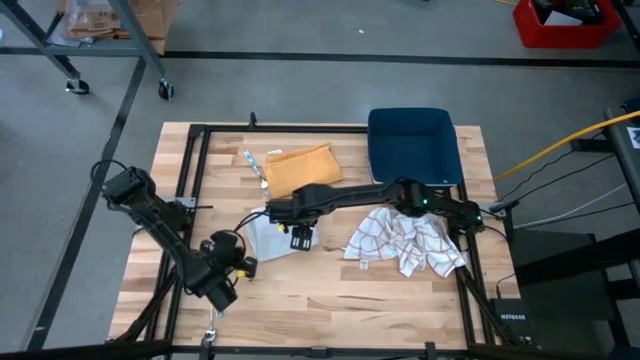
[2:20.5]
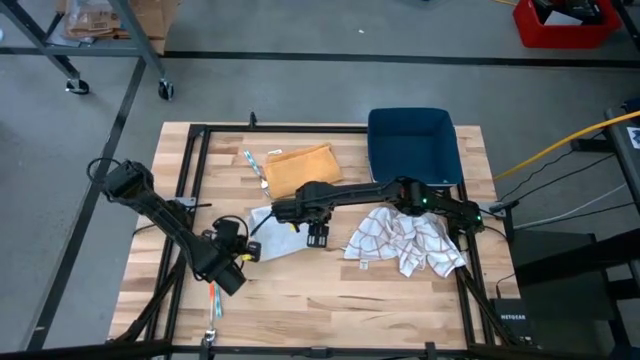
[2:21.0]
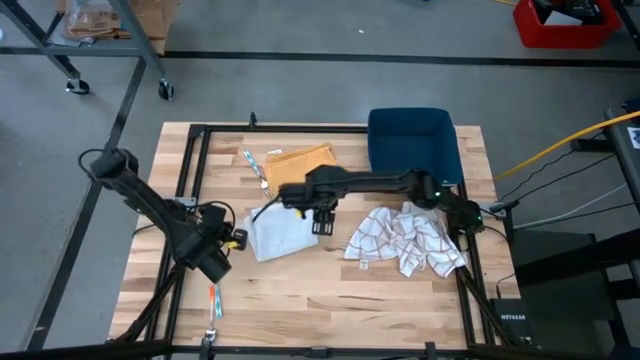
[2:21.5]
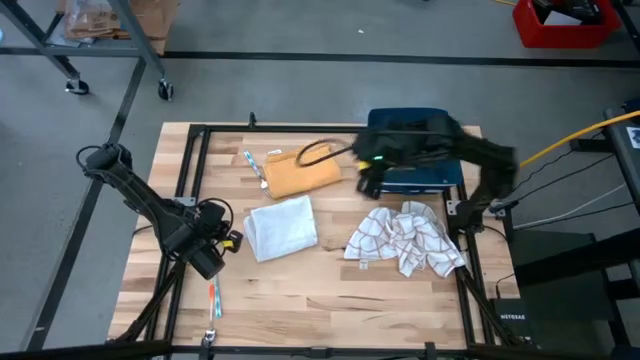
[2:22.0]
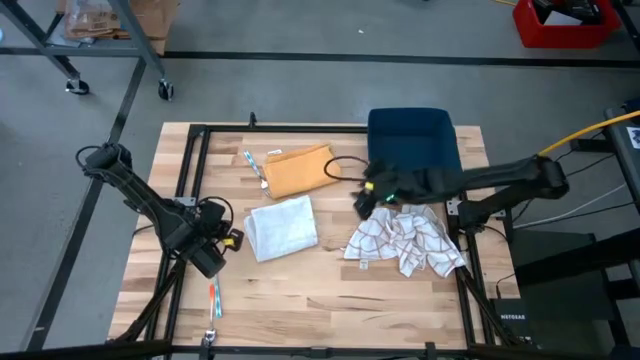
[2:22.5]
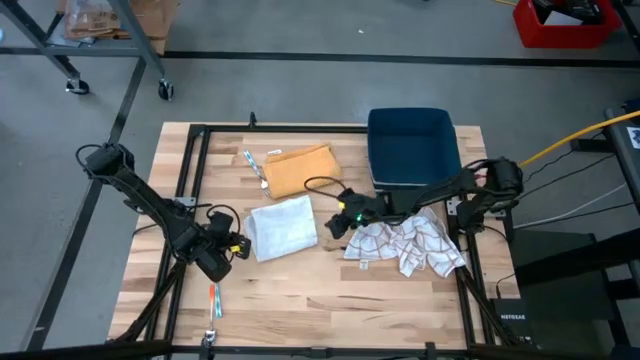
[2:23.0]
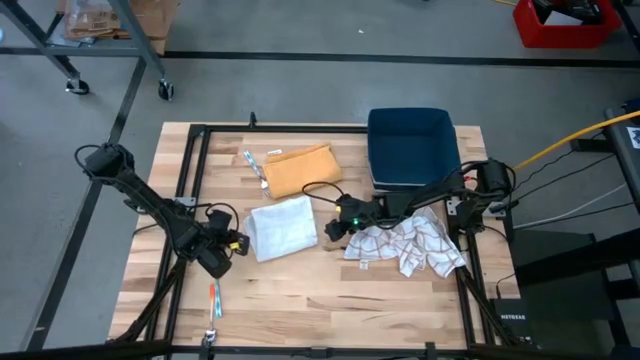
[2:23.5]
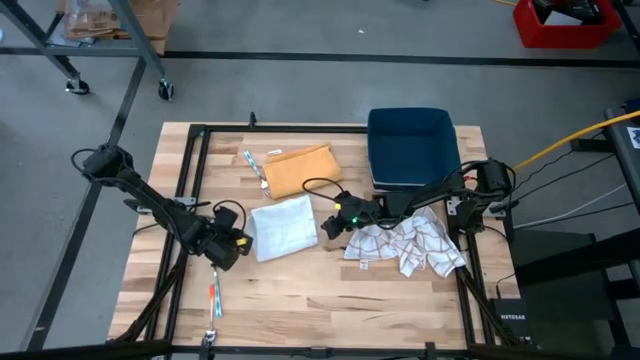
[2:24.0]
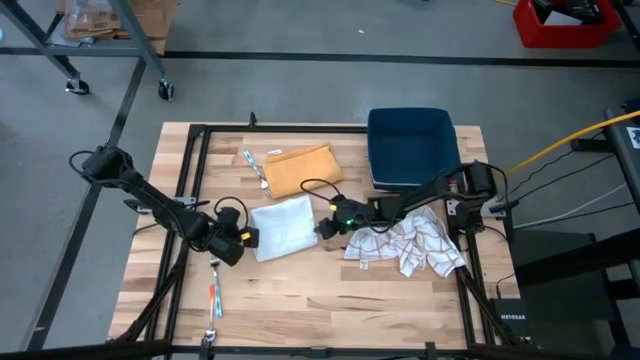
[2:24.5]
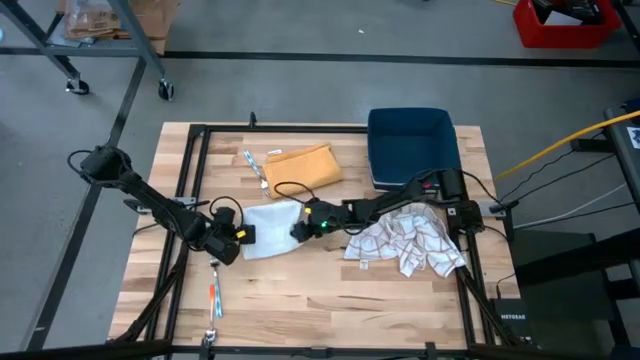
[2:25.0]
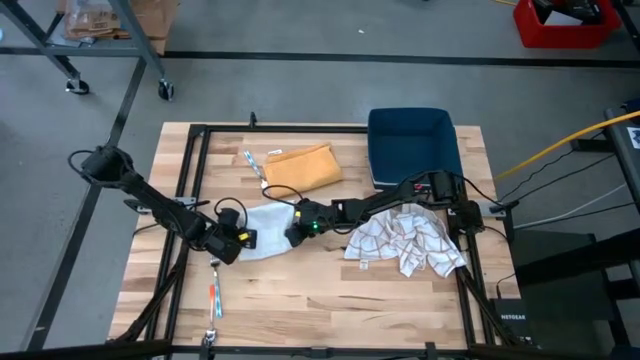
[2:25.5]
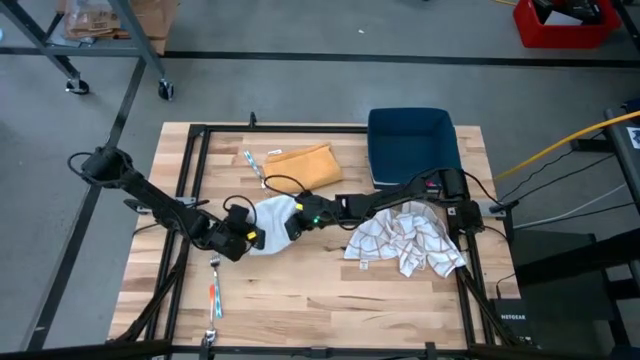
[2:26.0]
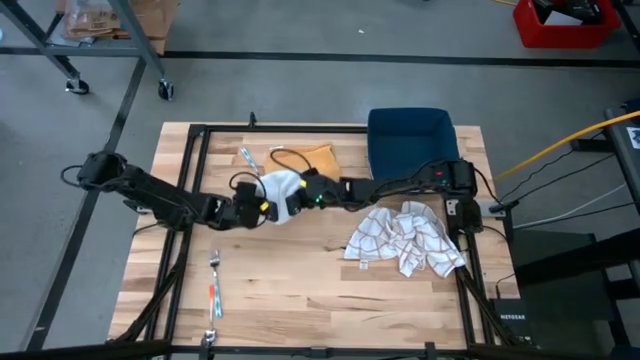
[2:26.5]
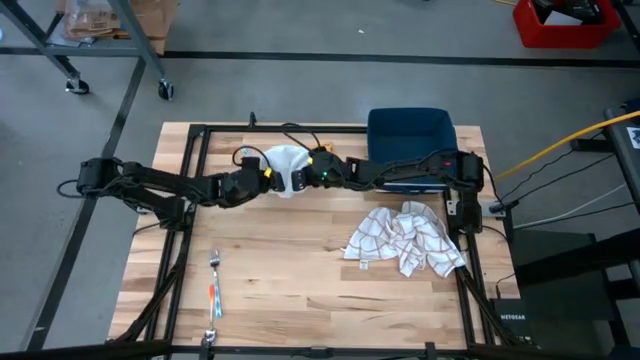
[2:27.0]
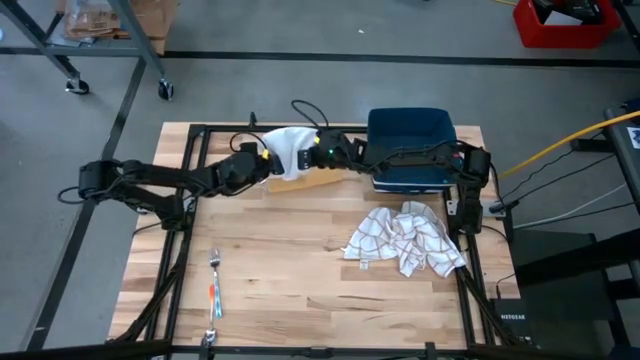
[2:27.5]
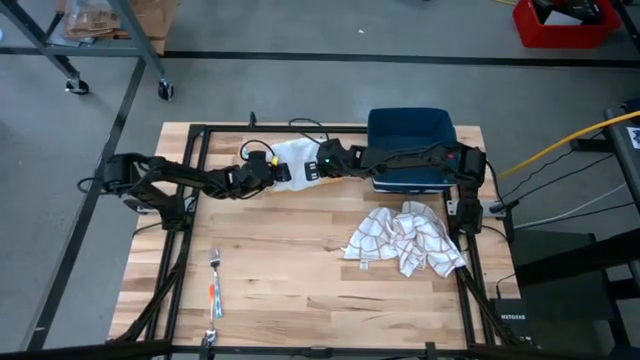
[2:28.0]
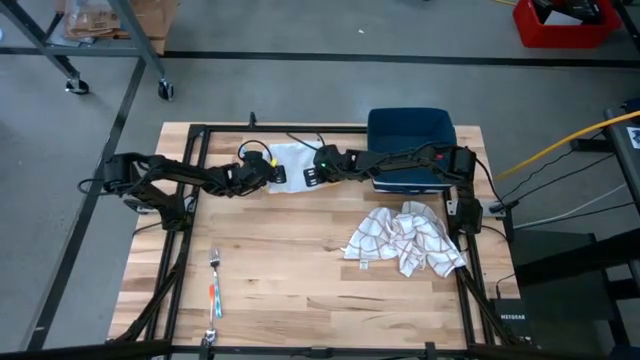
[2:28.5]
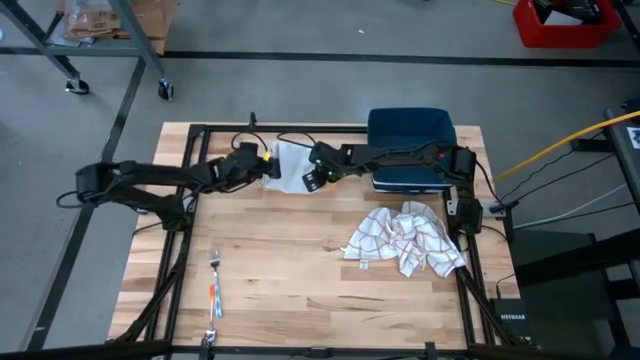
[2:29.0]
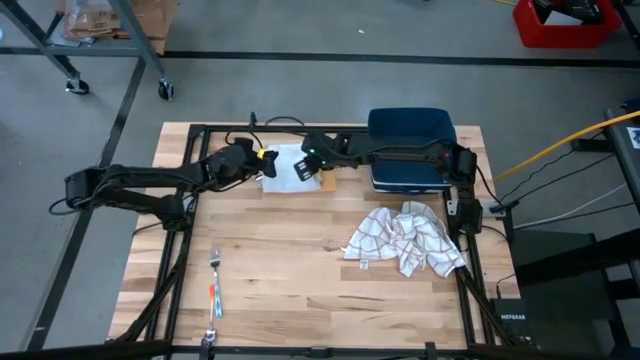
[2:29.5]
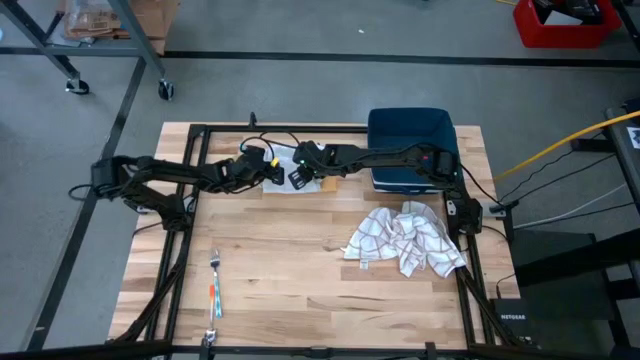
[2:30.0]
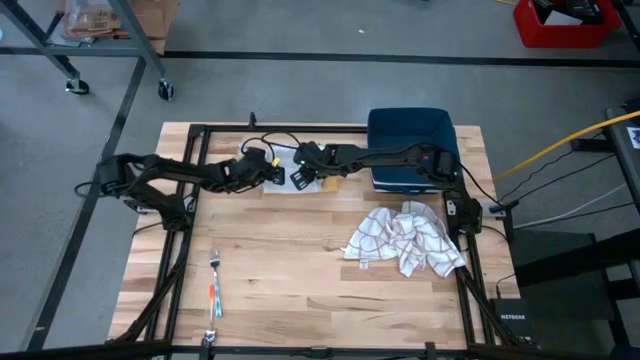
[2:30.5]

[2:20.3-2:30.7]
Task: Fold towel
Stack the left folded white towel on top of the yellow towel

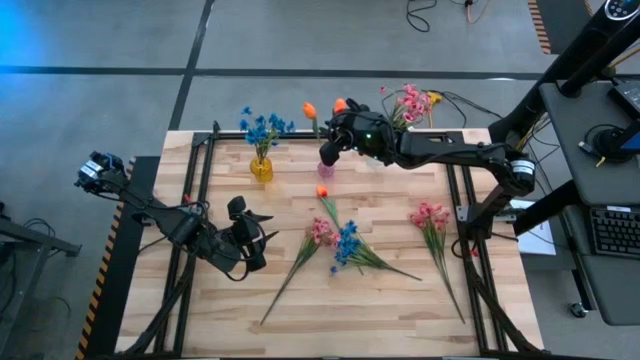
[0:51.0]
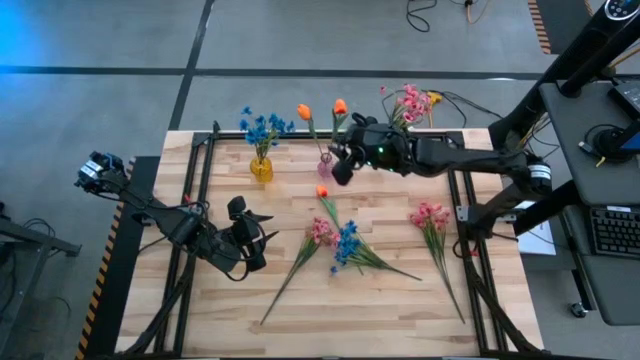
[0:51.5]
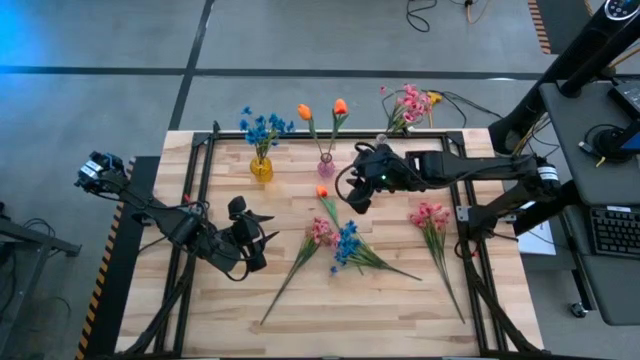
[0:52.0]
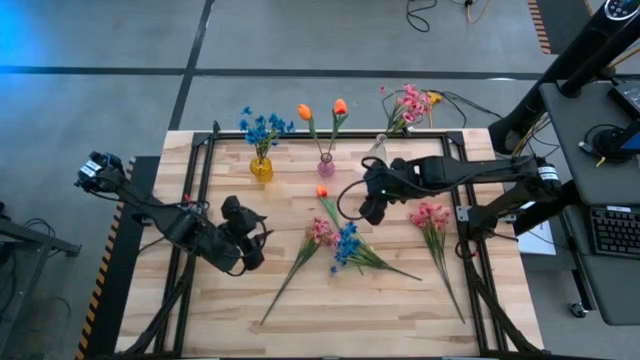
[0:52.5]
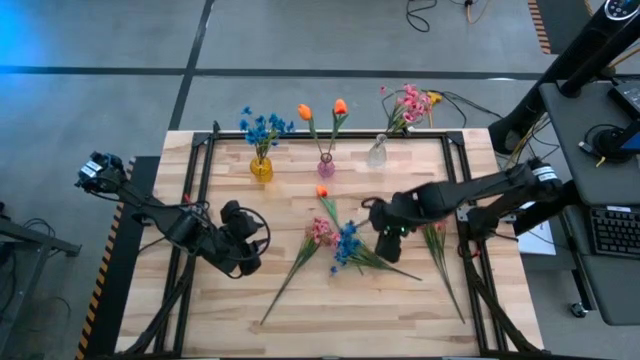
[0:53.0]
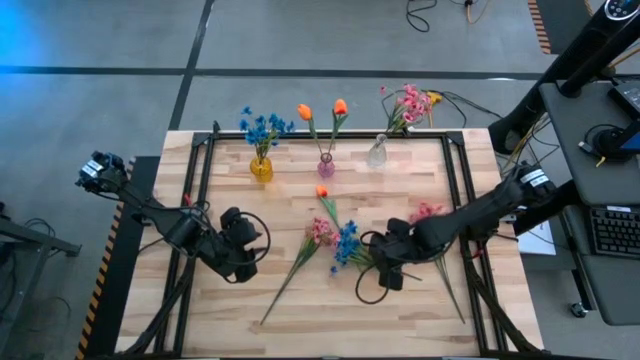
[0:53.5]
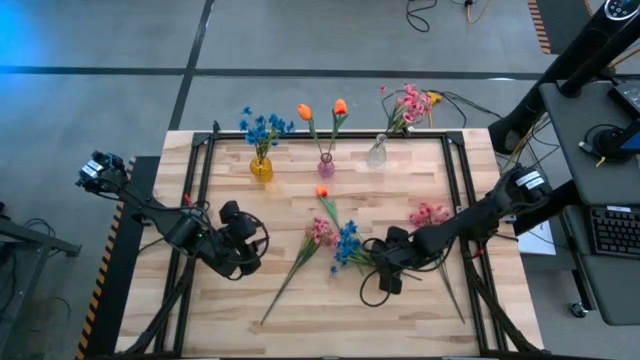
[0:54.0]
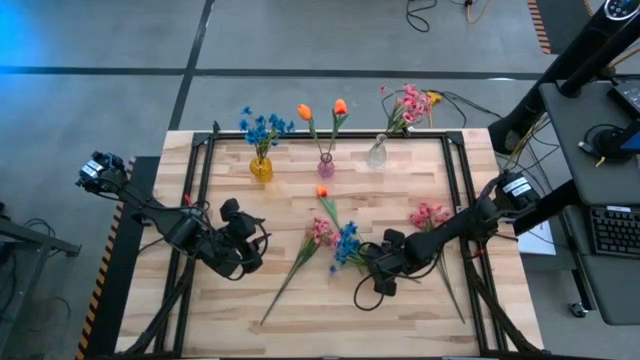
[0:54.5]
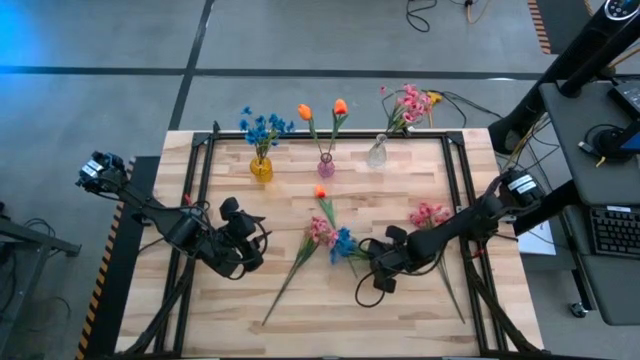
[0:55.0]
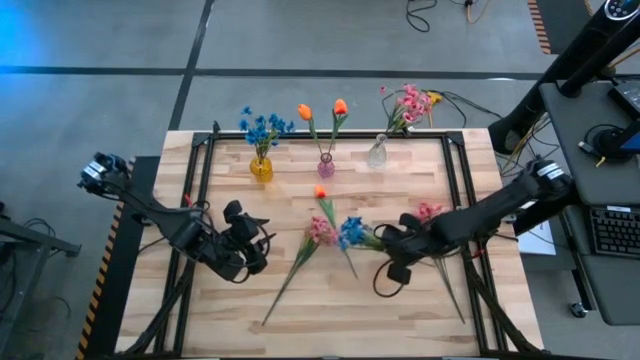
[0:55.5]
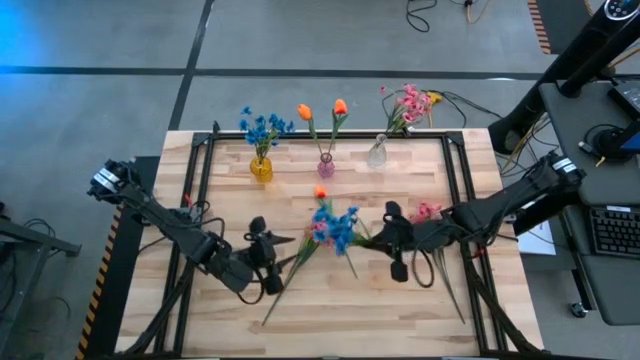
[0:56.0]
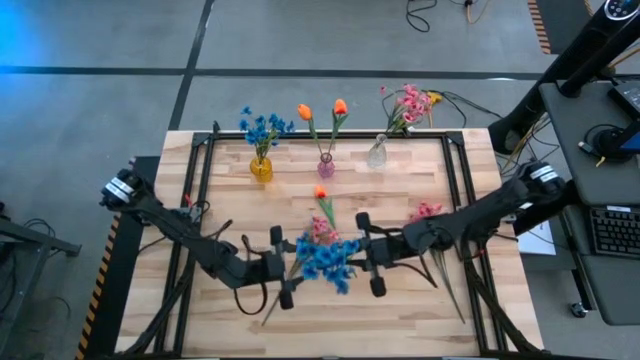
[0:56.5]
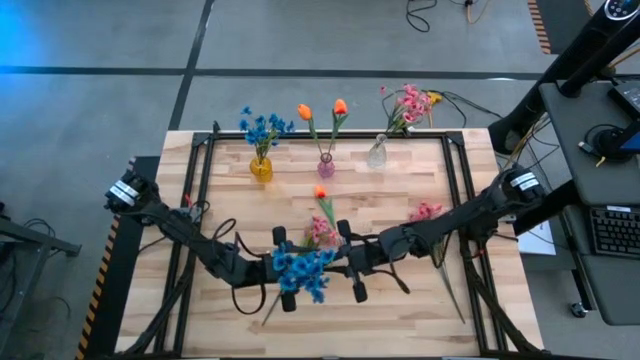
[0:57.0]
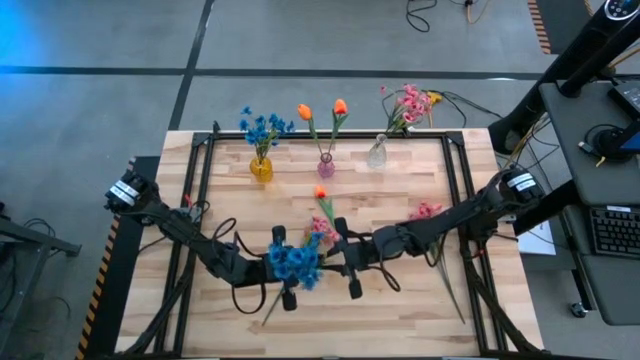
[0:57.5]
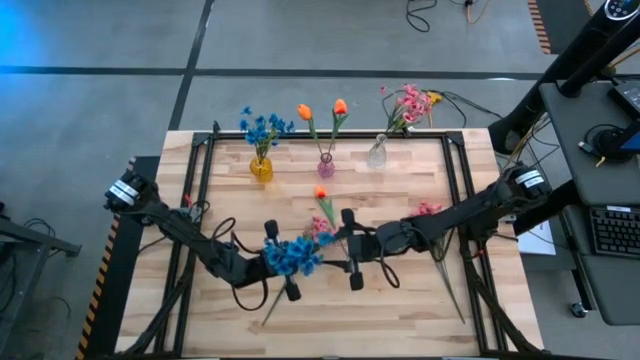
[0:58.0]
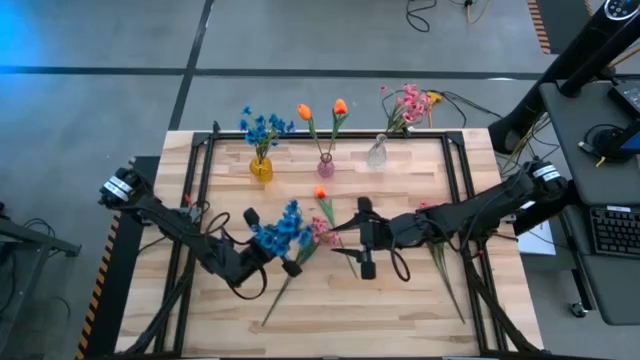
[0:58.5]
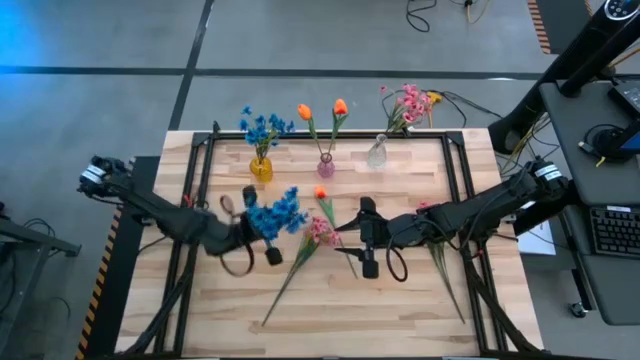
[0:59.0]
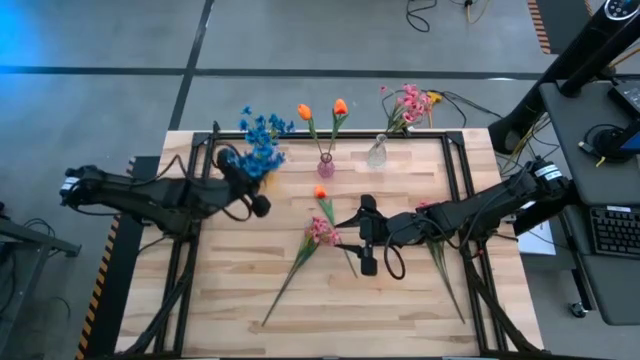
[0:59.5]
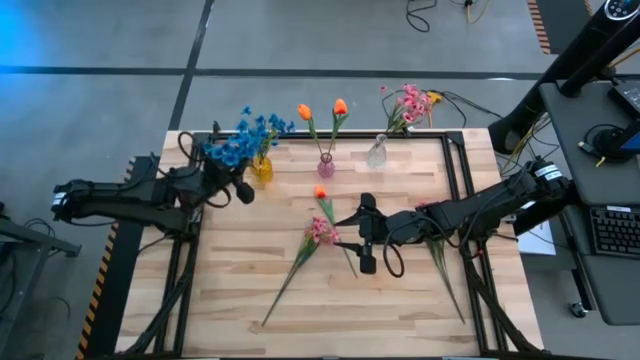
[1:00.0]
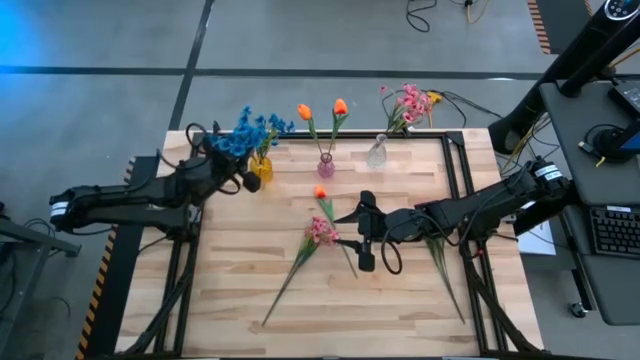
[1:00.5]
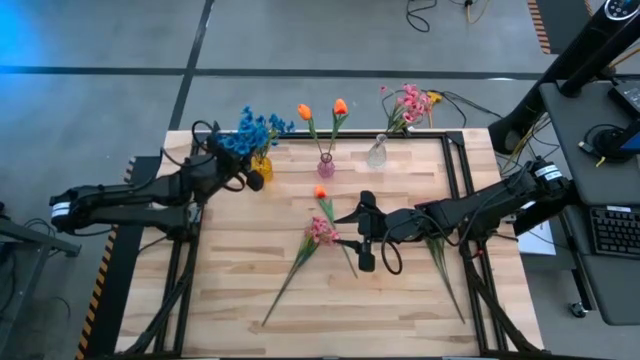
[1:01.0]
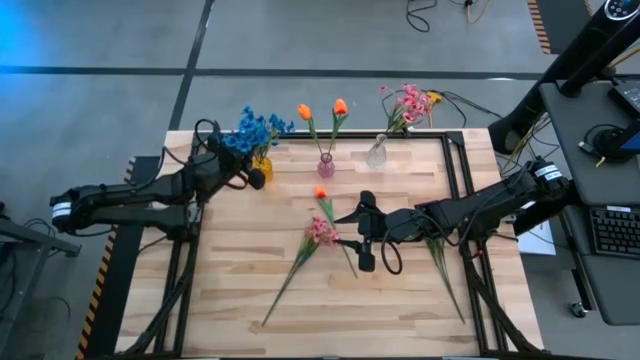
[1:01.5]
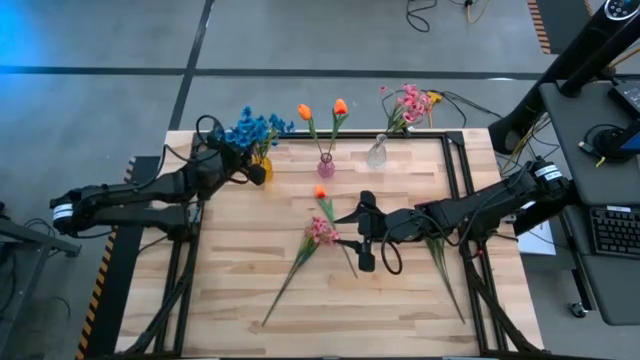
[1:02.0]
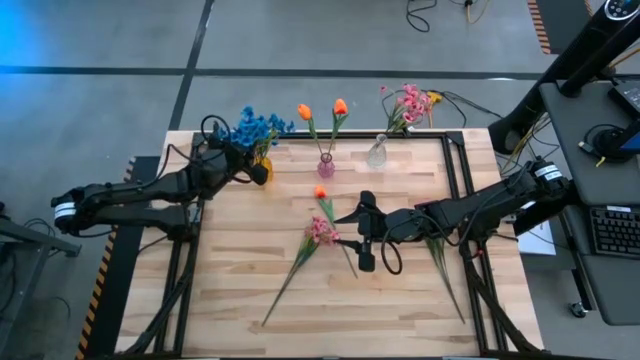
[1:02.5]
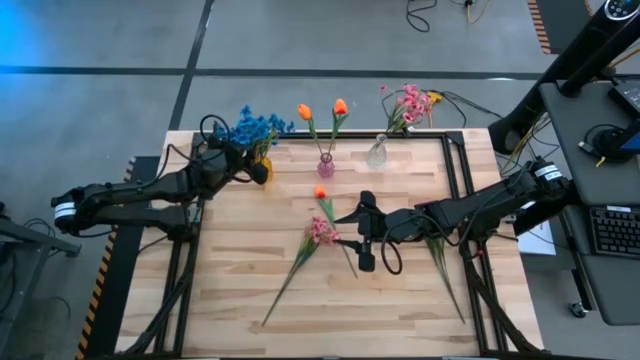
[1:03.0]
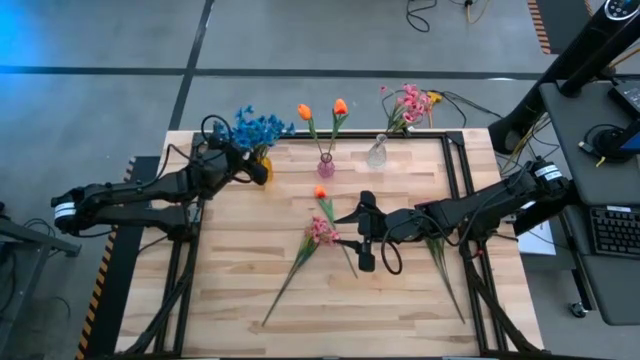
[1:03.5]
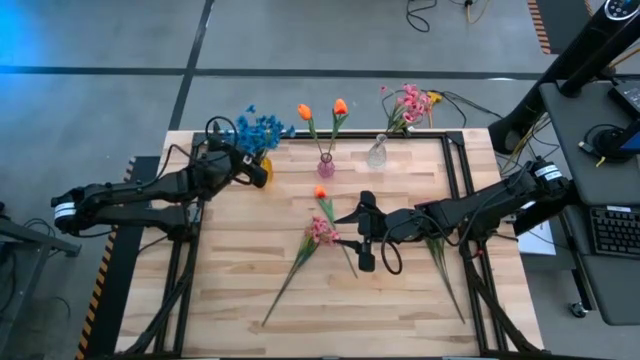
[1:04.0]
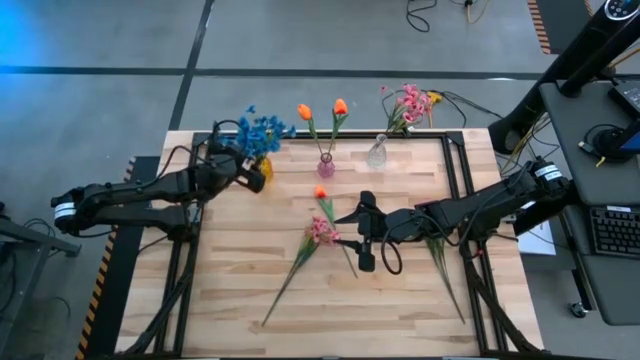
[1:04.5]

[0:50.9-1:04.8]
Task: Sort flowers into vase by color
Put the blue flowers into the yellow vase
